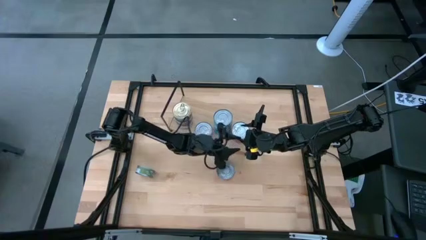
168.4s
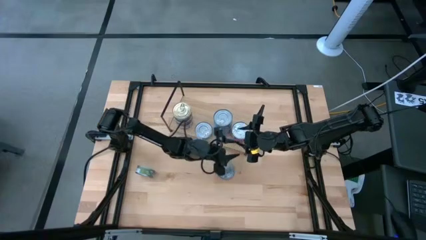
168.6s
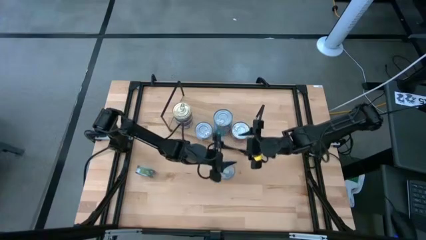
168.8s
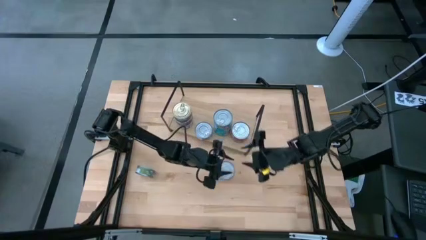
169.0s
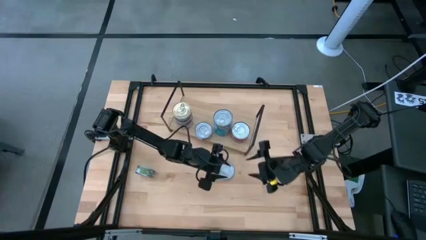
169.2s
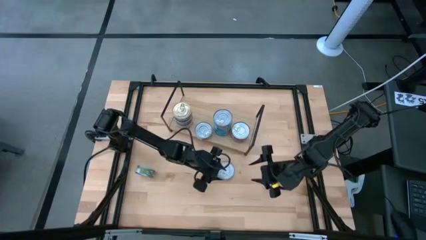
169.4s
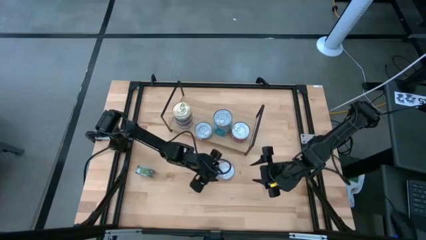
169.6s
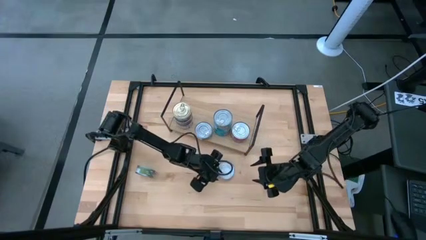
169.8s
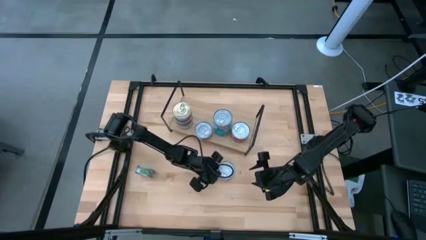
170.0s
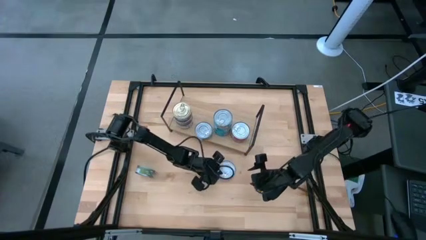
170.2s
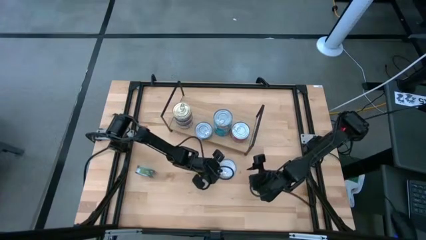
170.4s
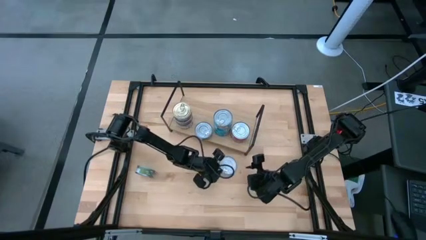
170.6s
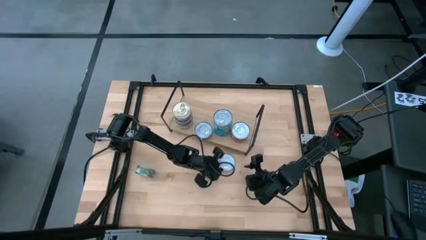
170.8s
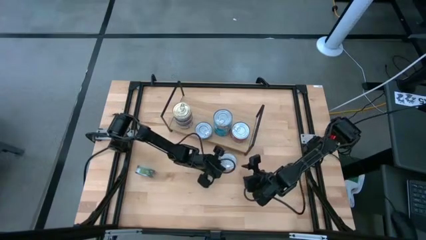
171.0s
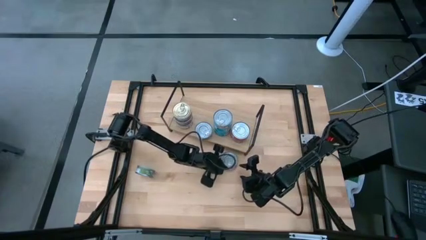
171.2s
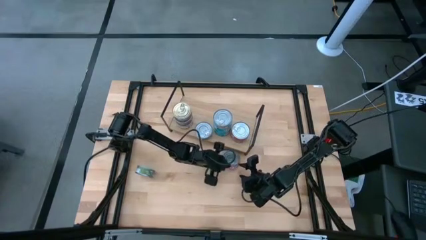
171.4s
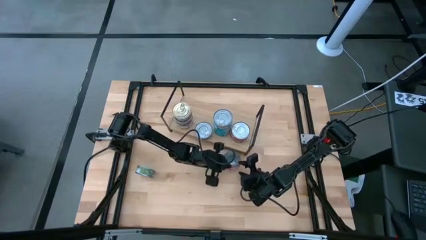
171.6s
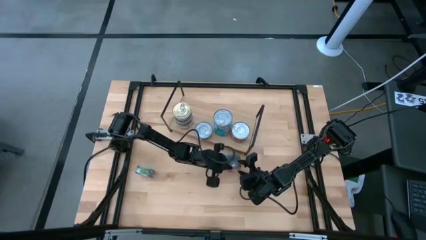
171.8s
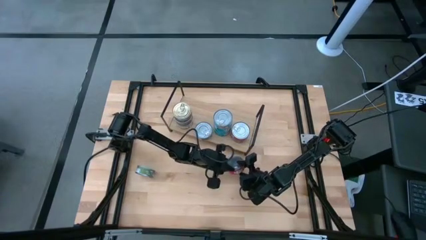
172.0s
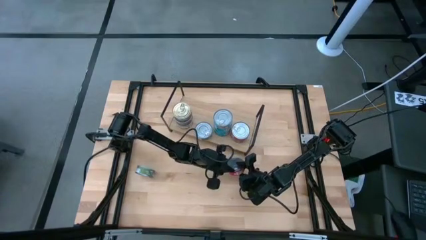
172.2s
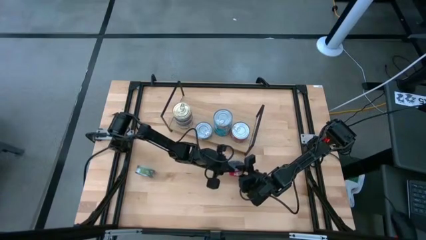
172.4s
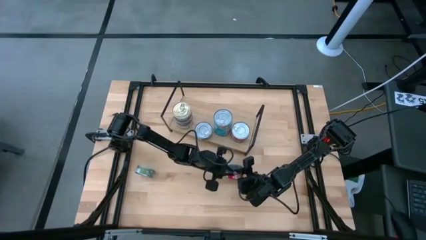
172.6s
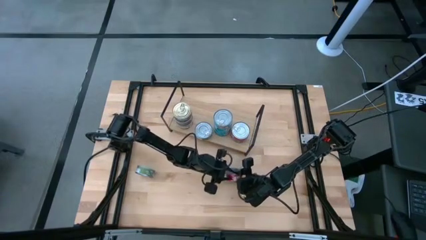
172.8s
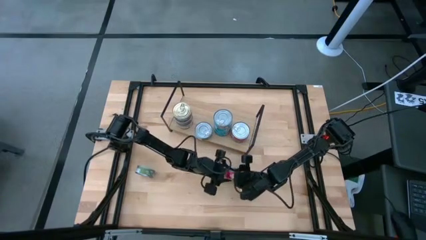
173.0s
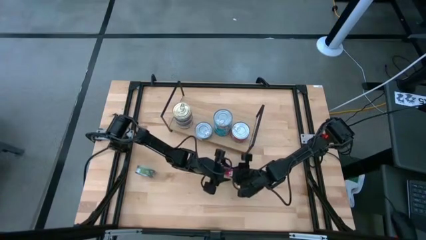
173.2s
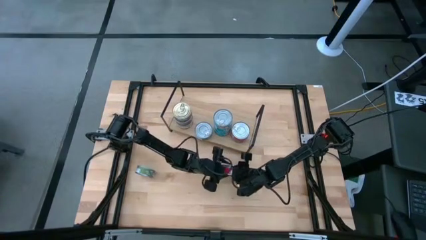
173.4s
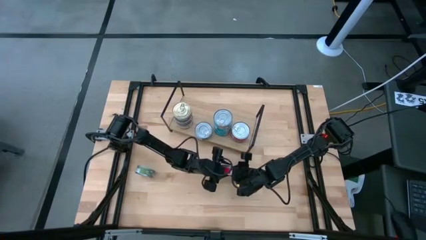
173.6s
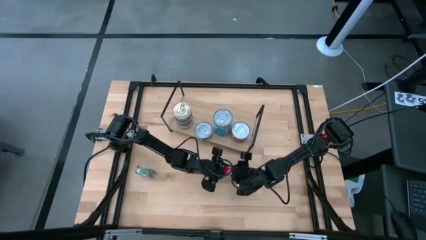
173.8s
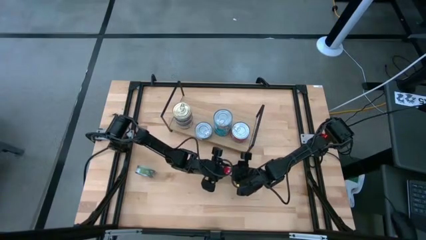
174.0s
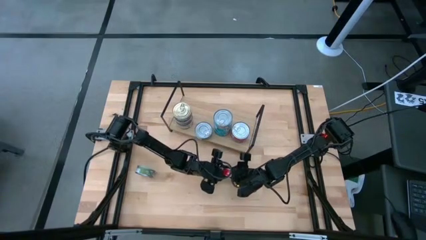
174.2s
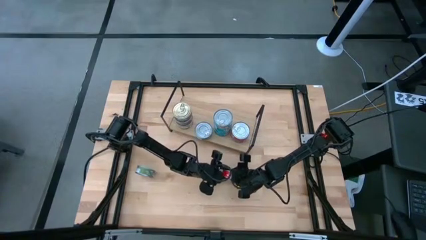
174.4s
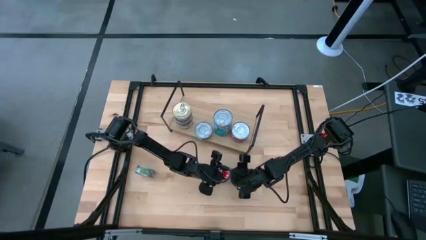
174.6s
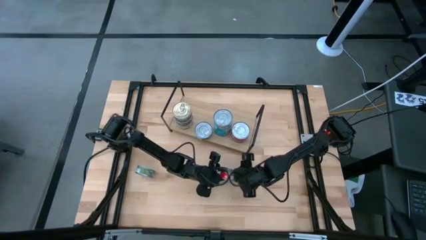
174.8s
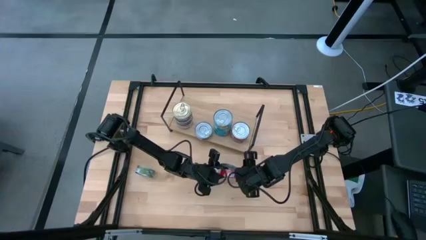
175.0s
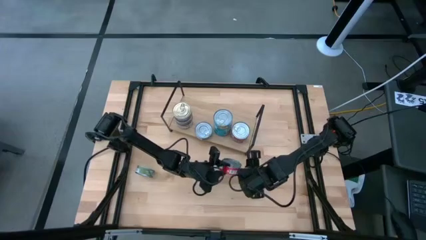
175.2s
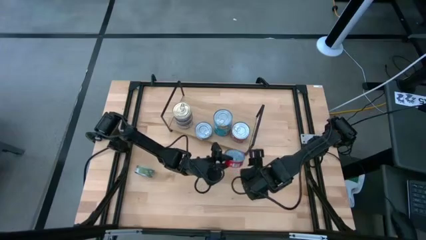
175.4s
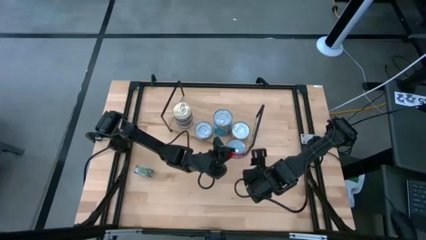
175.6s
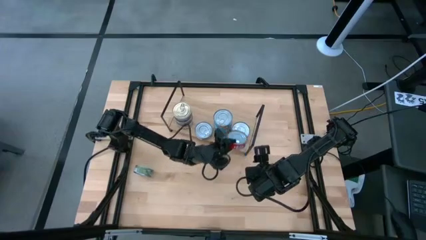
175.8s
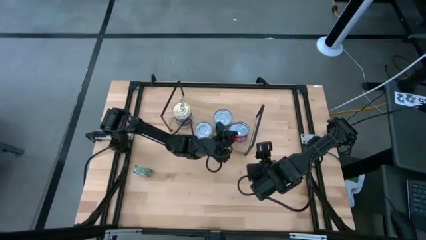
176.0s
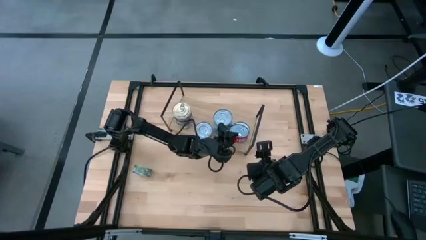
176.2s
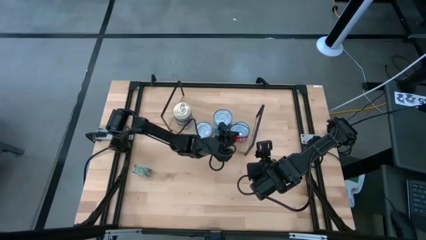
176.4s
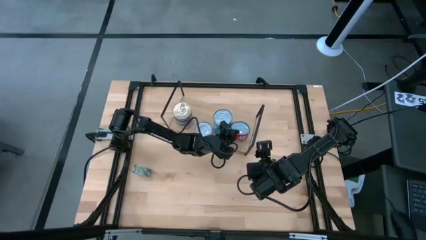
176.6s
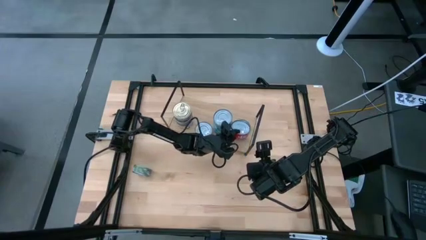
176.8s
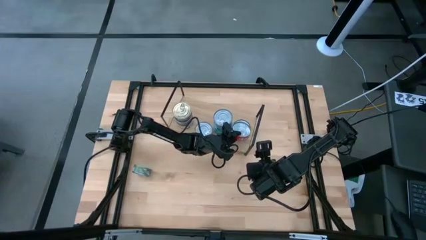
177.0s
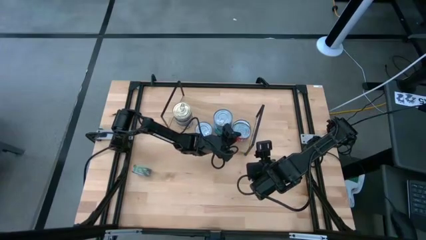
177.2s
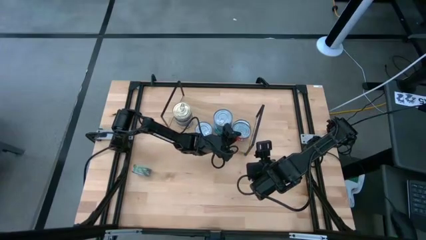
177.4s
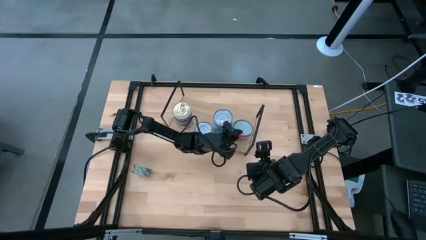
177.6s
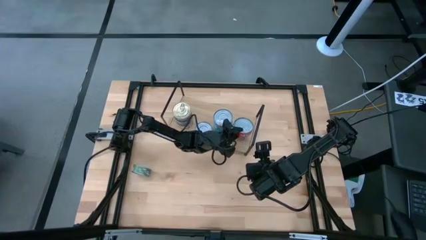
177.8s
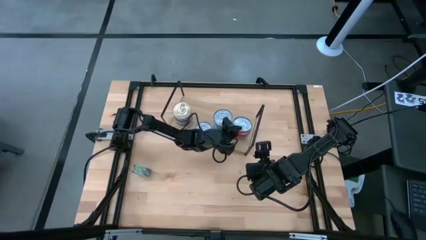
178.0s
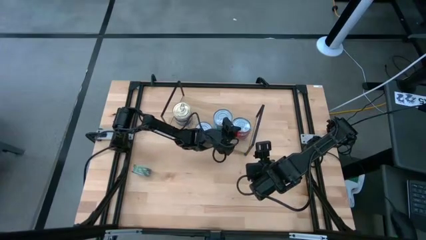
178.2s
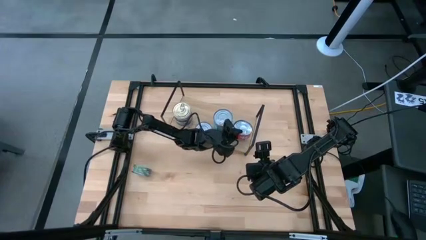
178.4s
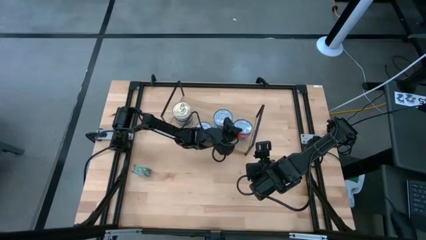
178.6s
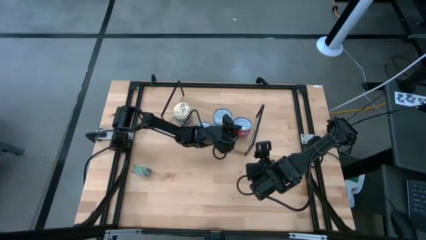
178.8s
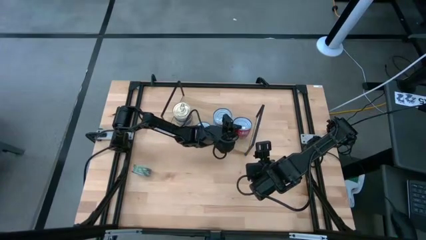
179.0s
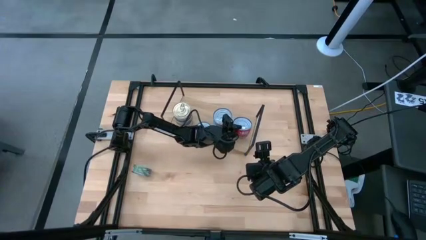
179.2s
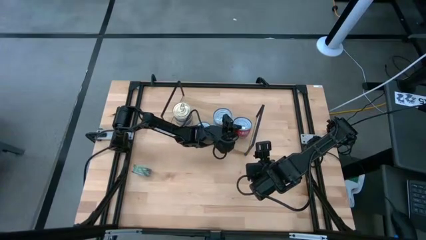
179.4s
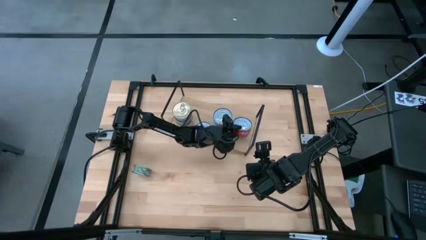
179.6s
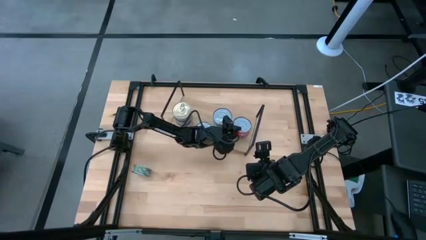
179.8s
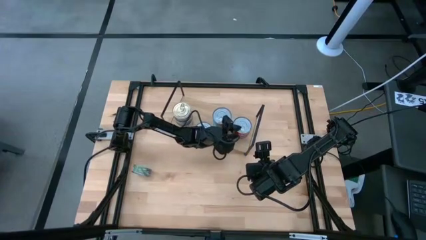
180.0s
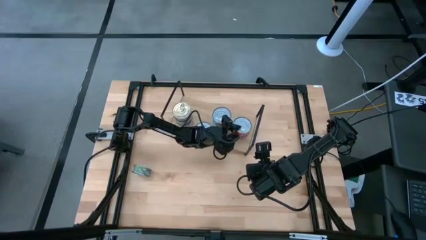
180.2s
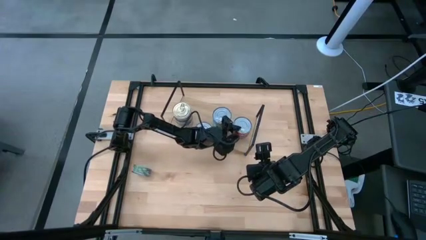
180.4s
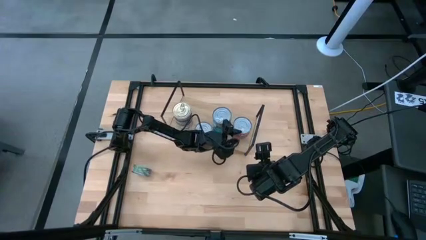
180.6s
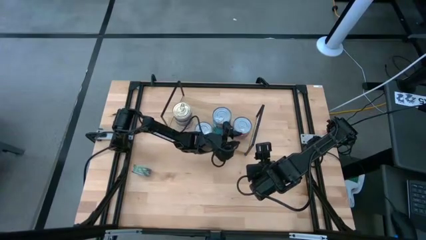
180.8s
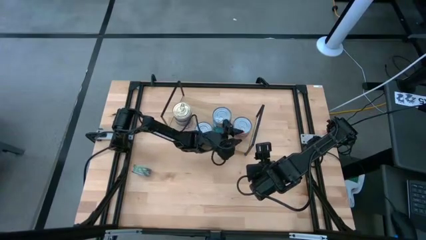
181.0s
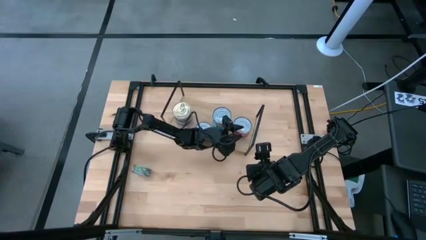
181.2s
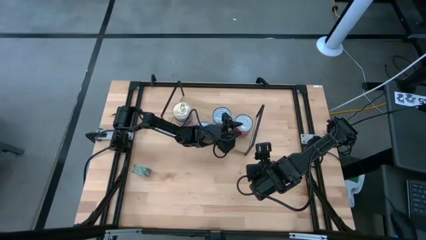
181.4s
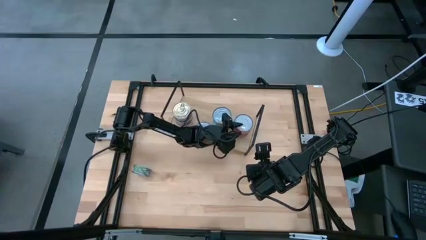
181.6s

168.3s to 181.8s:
Task: Stack canned seafood by type on shelf
Stack the red tuna can on the red tuna can on the shelf

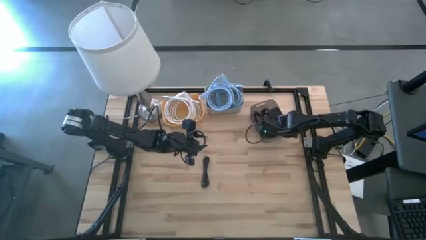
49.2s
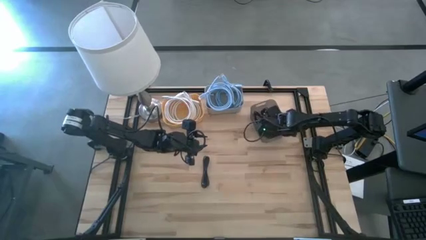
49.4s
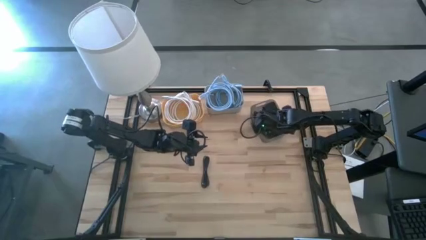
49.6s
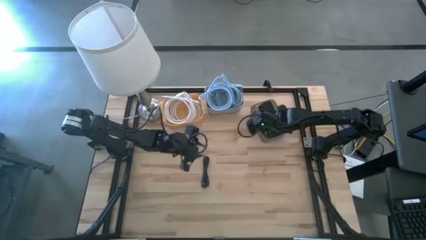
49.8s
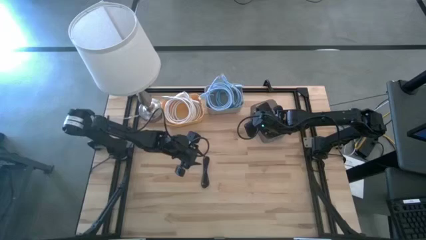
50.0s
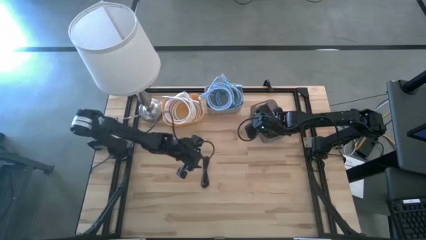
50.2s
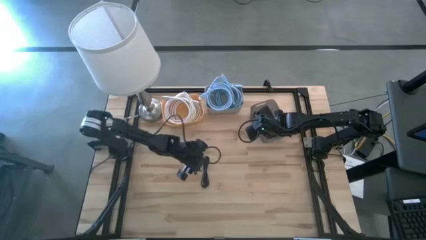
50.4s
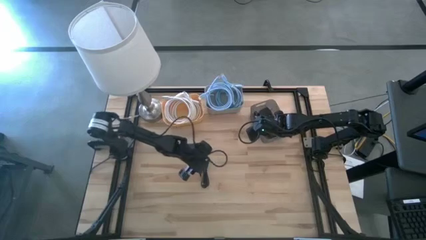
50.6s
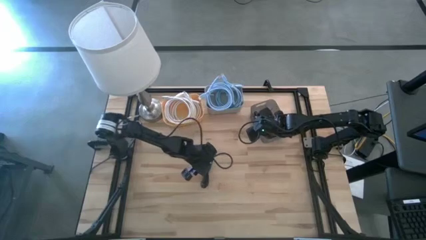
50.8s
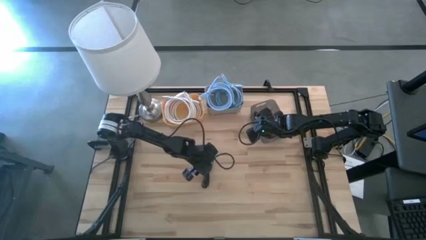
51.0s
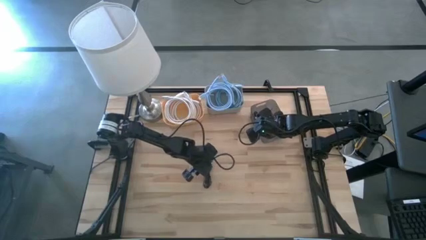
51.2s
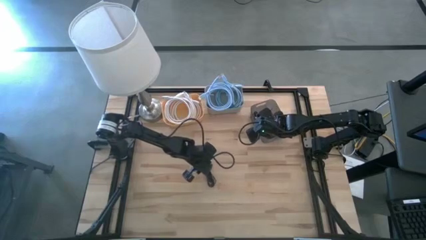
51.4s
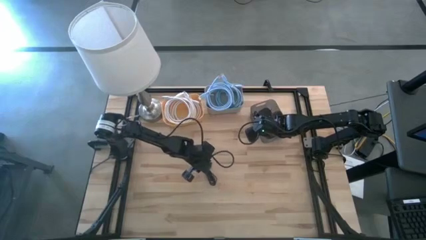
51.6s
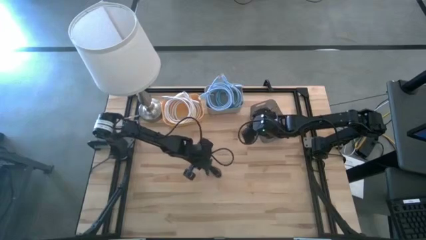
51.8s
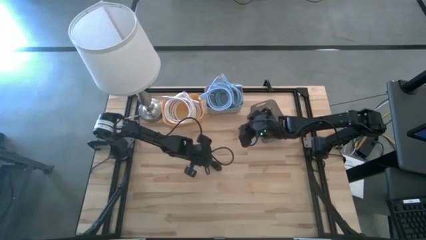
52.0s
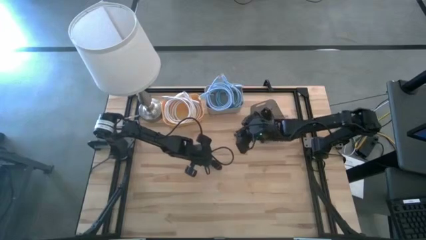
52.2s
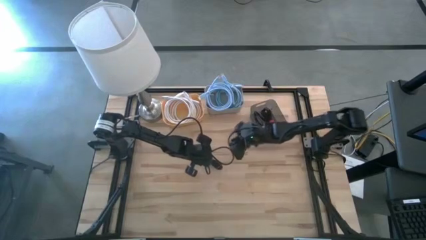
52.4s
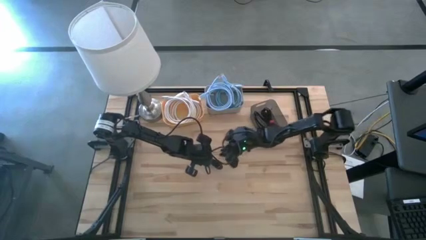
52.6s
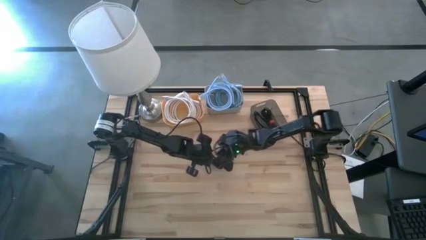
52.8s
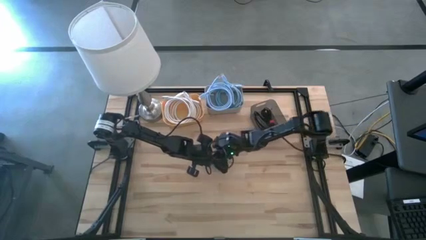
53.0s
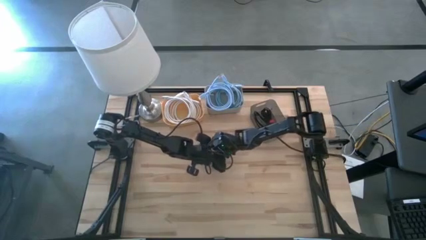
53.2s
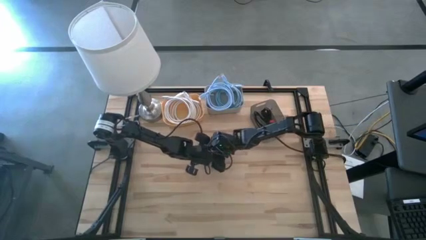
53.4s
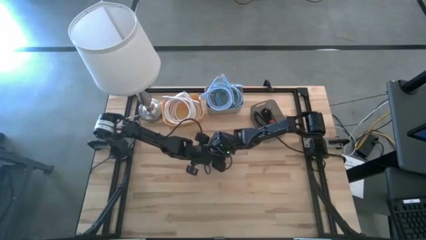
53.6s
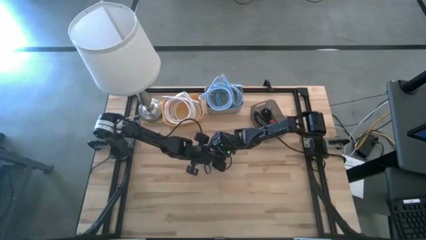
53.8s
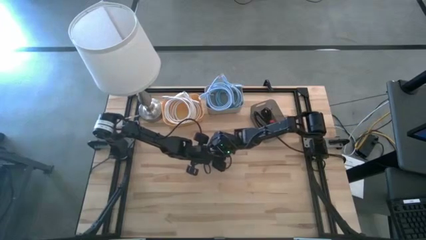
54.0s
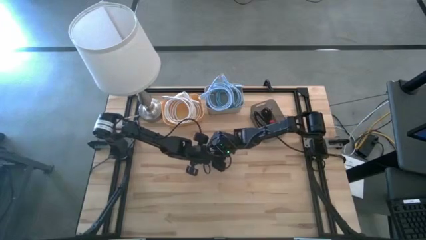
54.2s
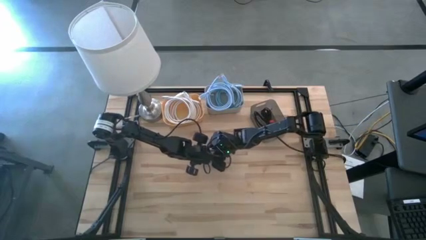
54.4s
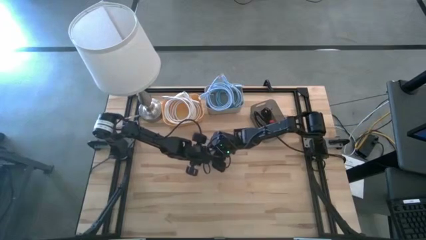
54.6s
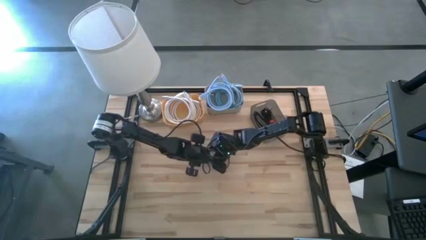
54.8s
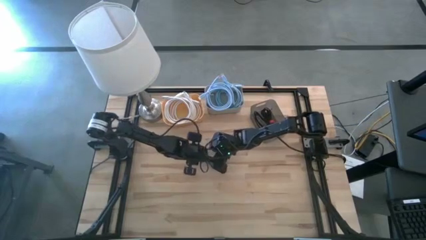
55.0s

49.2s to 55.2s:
Task: Pick & Place USB Port
Put the black charger cable into the black bin
